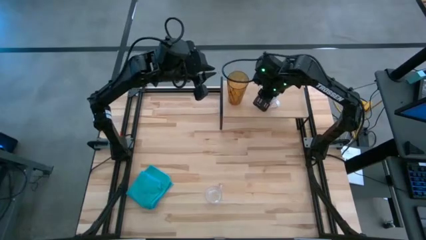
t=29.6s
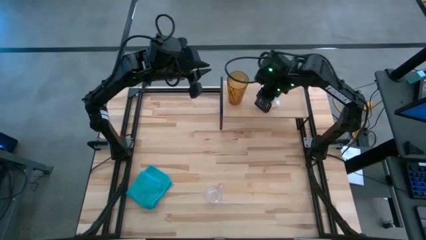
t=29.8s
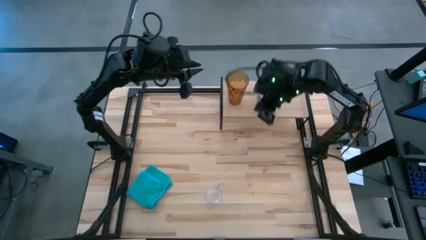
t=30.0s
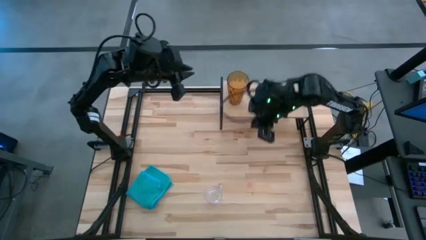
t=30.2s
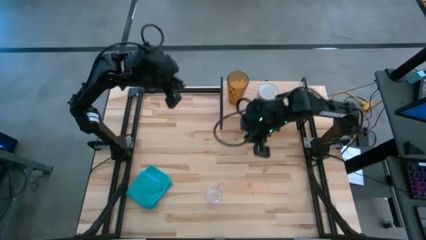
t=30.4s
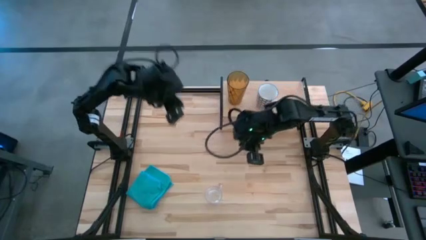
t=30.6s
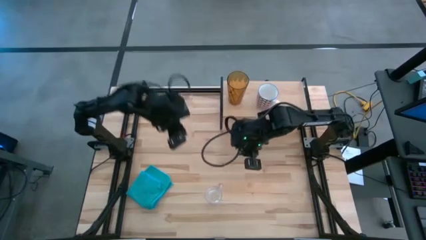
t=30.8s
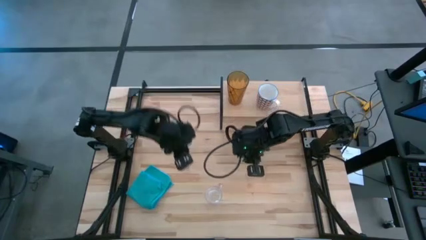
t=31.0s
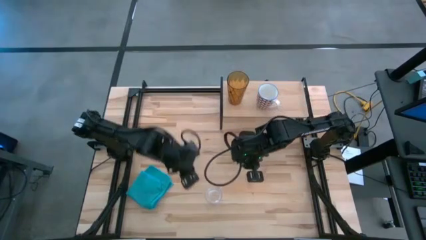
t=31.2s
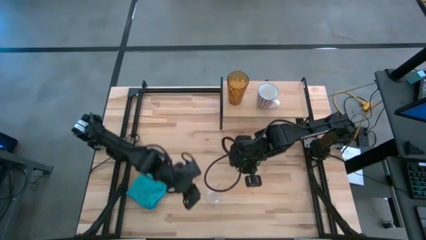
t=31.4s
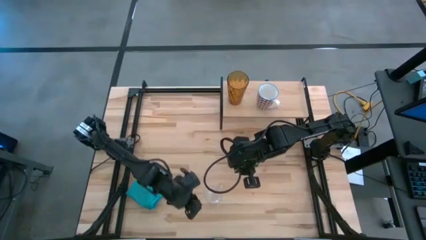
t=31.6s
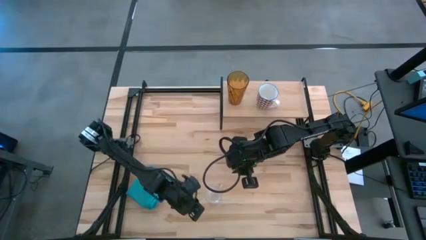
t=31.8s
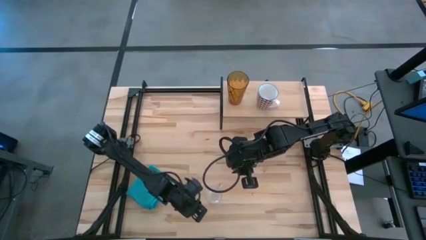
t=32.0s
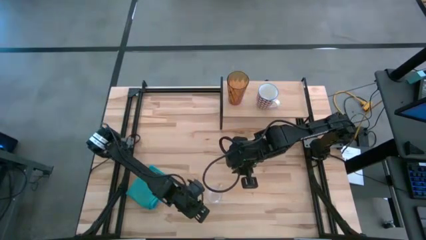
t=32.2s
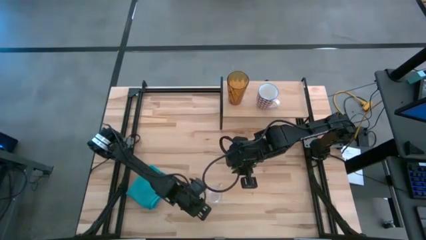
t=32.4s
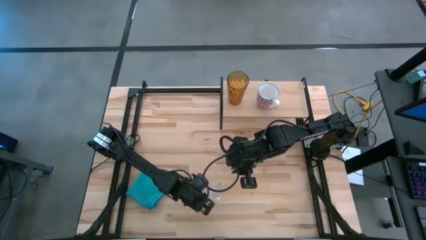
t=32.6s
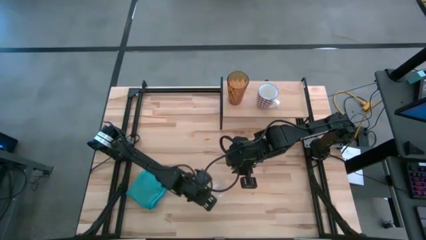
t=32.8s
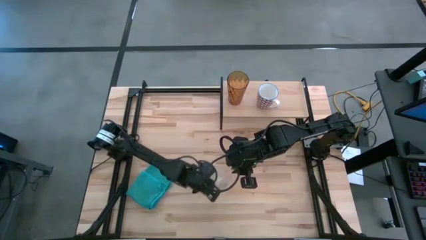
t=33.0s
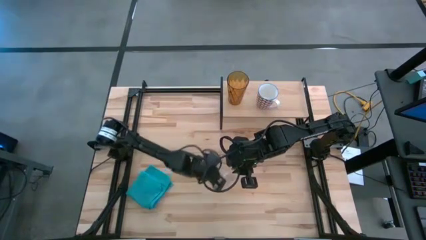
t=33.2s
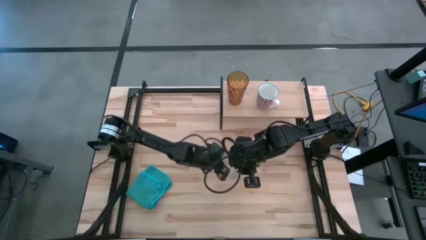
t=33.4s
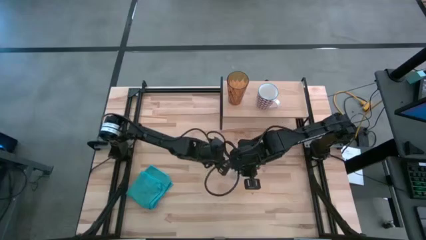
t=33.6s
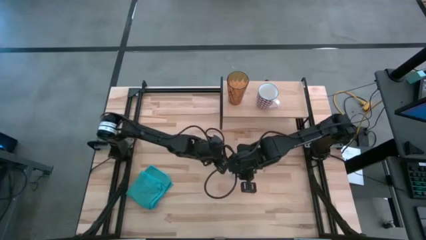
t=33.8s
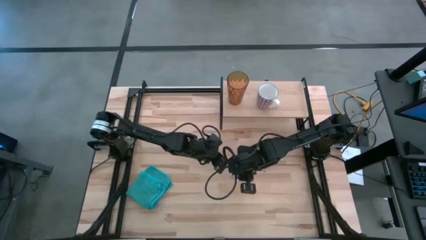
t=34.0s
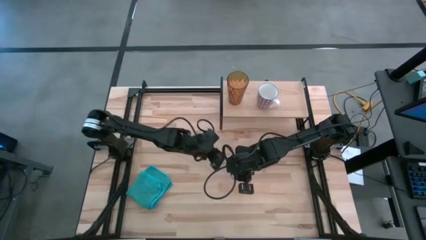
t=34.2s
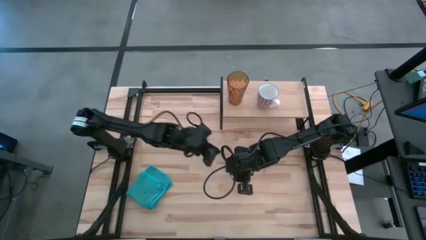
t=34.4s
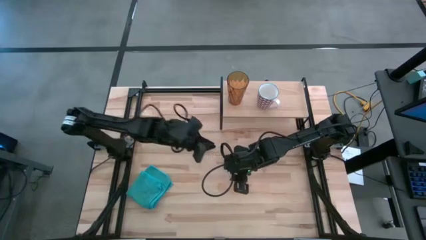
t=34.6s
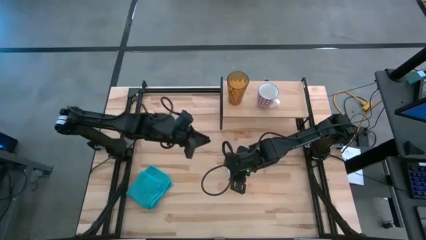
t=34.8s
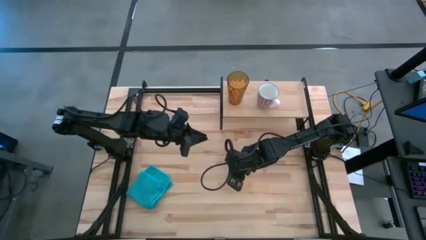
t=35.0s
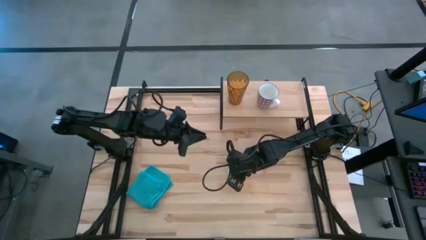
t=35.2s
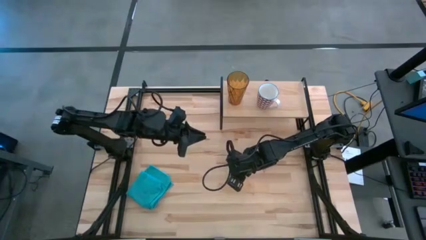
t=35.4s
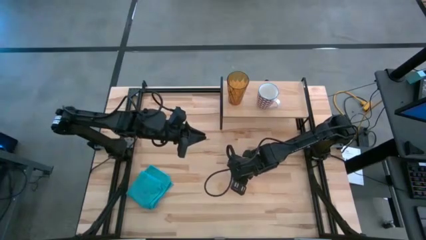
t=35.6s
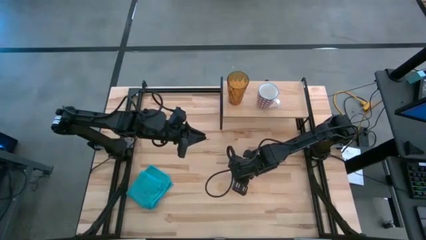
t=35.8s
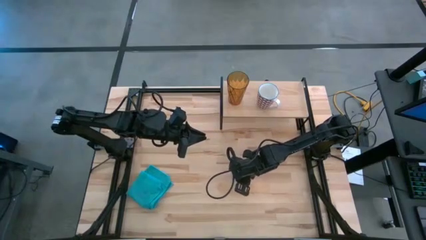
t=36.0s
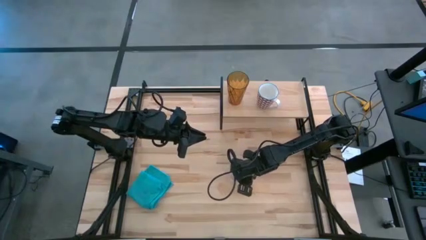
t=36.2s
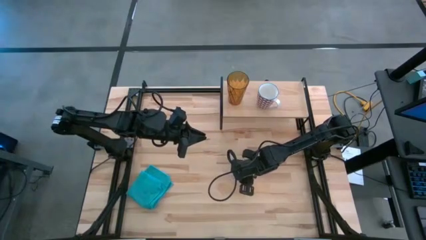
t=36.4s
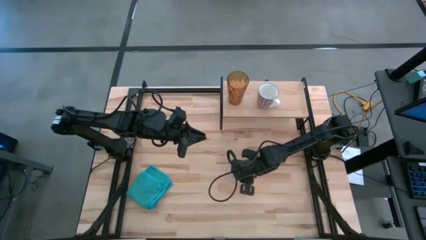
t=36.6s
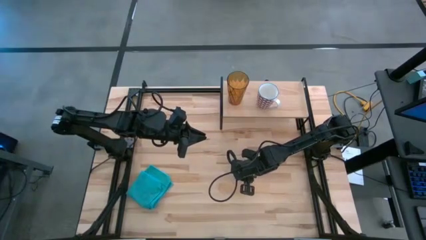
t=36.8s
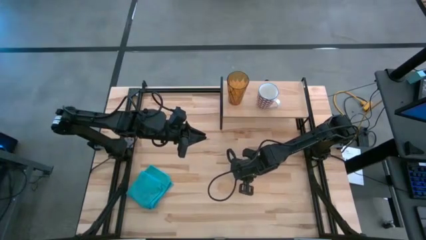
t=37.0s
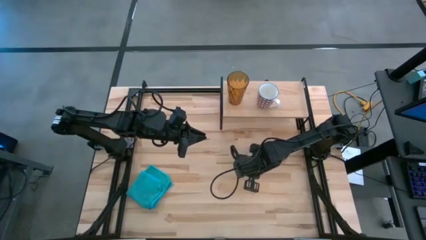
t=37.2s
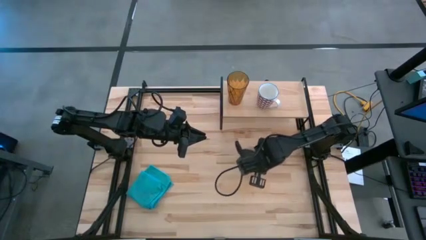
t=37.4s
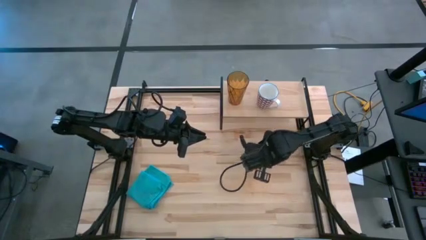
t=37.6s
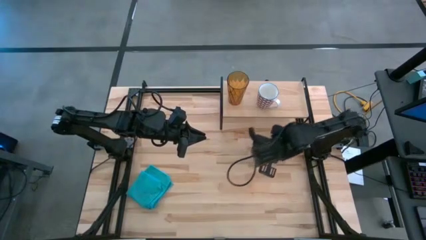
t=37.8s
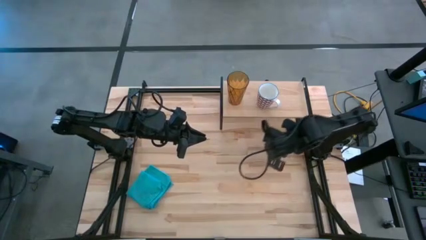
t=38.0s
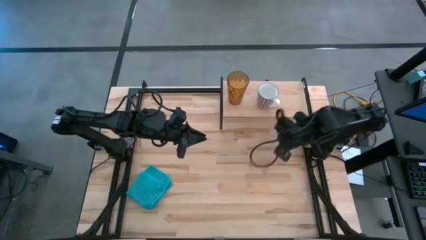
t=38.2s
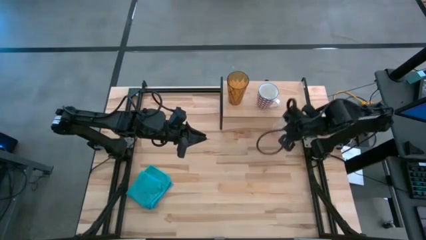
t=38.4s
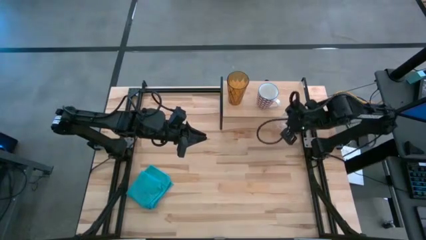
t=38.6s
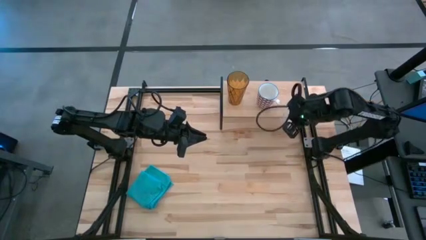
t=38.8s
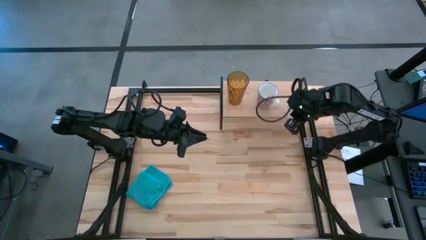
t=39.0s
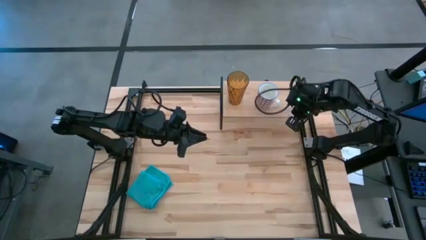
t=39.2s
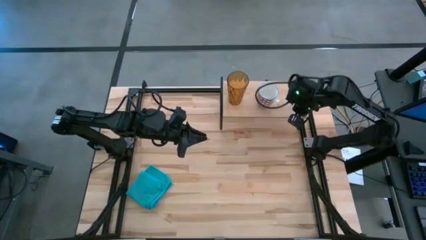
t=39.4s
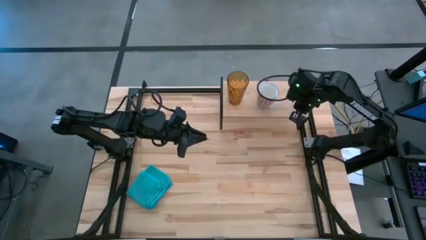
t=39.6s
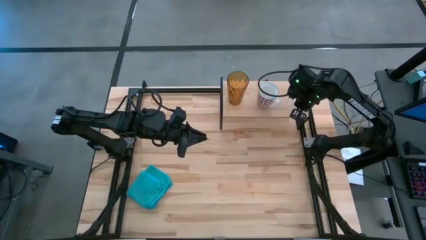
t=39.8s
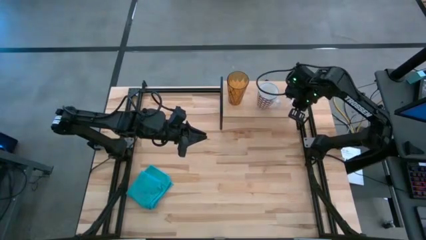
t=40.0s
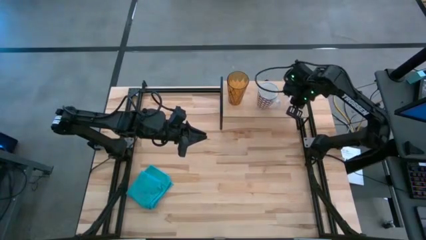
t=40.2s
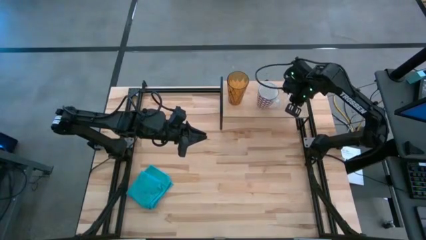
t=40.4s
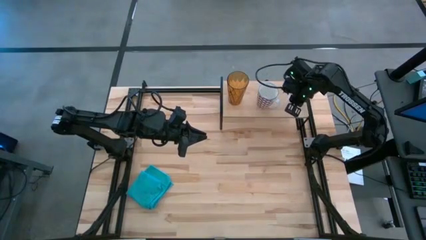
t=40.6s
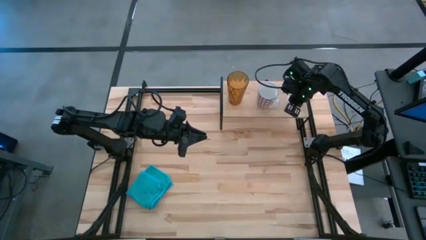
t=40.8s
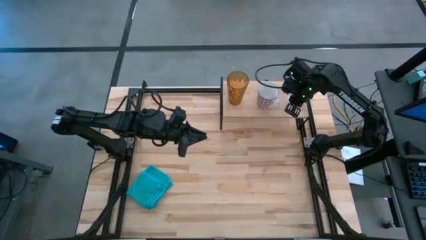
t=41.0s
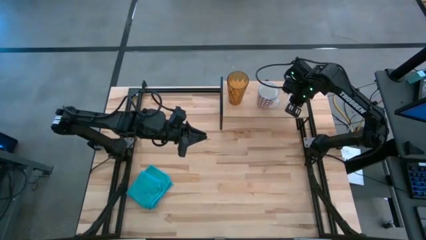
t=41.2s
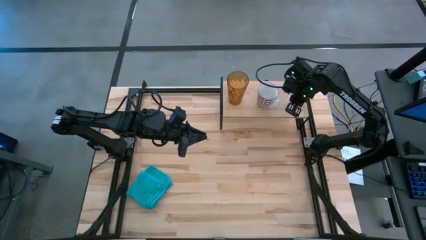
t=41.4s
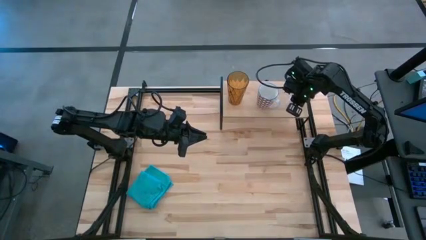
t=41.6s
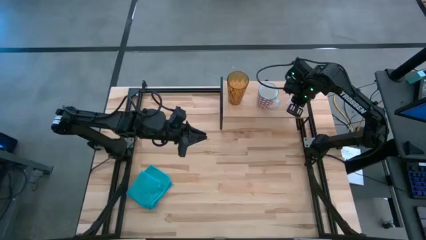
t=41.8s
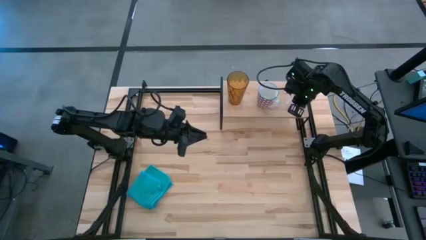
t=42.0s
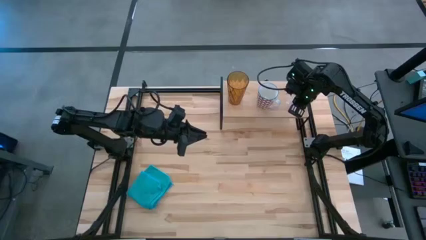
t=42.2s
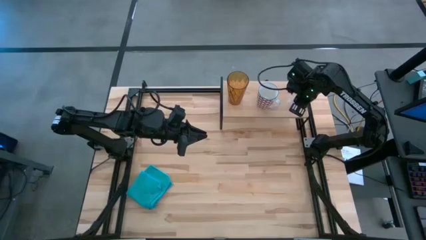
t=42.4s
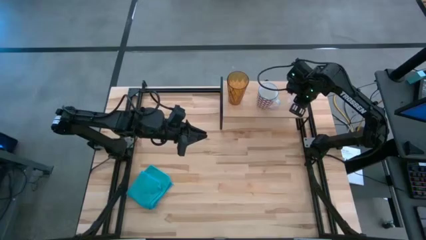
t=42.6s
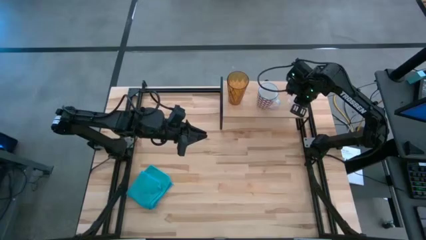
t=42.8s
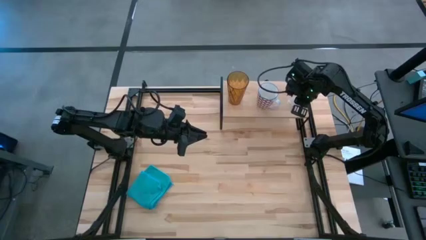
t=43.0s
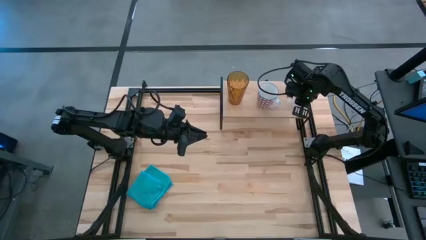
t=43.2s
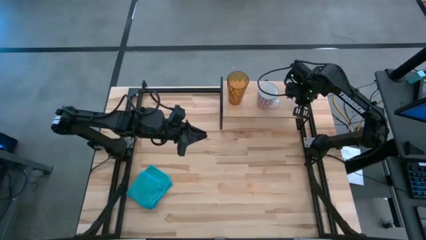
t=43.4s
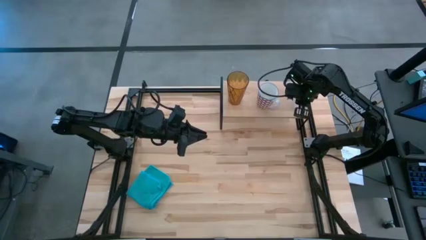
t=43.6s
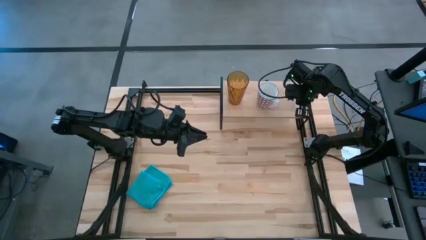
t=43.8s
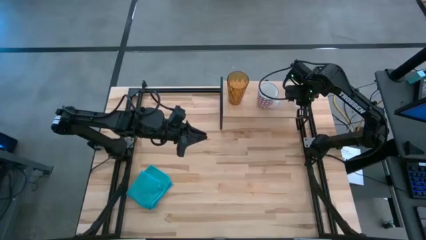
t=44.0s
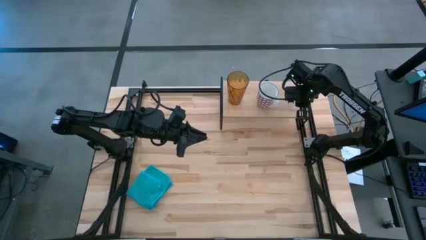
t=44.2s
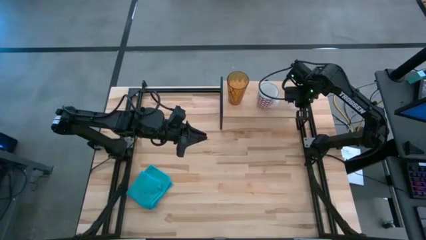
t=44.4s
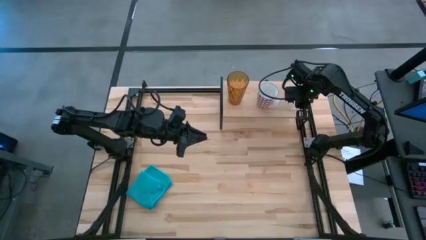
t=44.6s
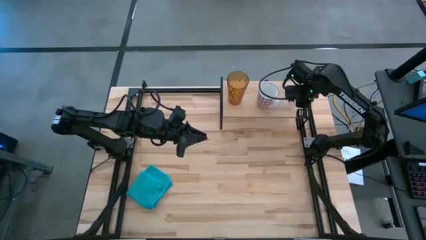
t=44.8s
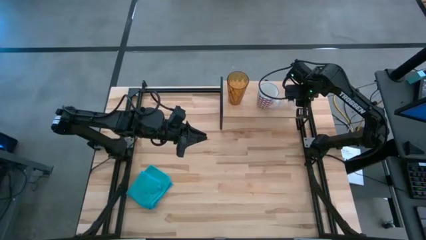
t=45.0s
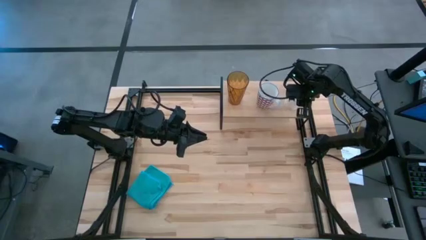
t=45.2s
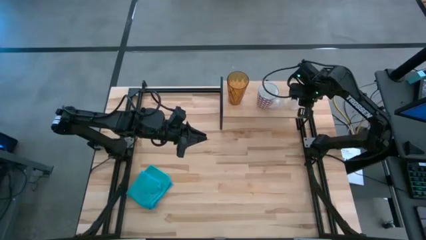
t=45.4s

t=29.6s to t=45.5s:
Task: Stack small to large cups/mugs on shelf
Put the transparent mug on the shelf
